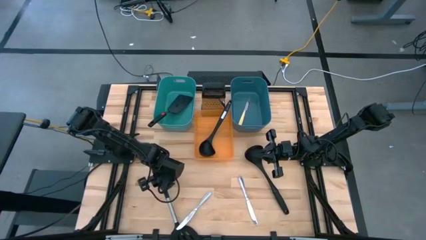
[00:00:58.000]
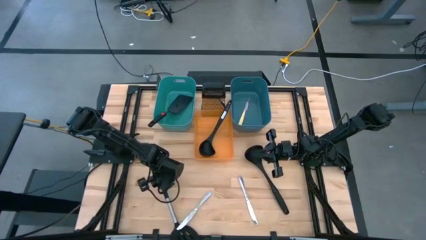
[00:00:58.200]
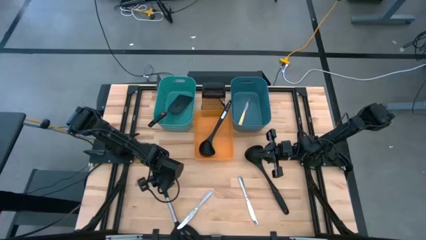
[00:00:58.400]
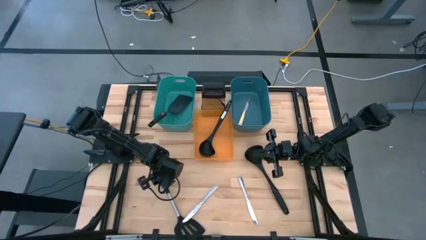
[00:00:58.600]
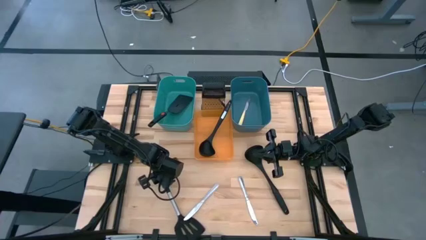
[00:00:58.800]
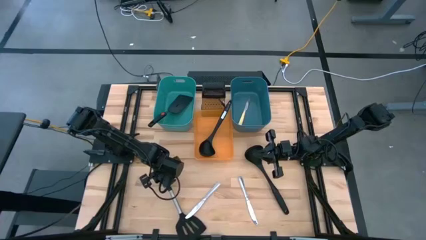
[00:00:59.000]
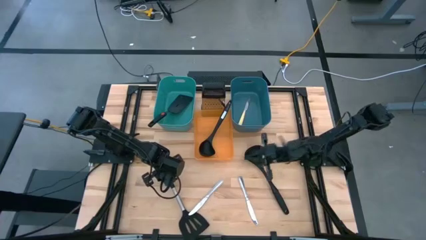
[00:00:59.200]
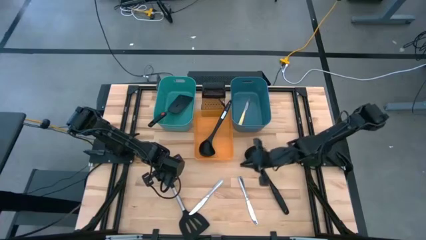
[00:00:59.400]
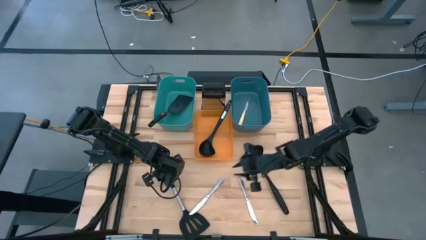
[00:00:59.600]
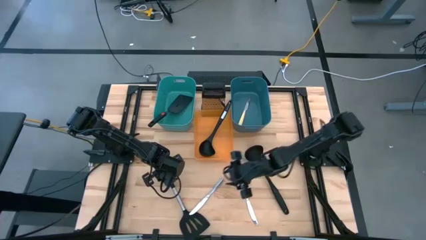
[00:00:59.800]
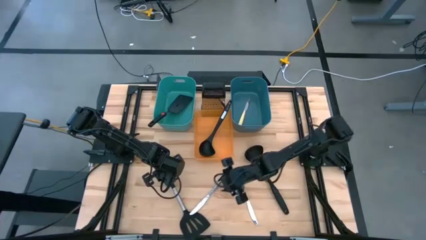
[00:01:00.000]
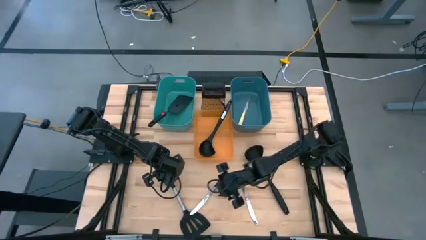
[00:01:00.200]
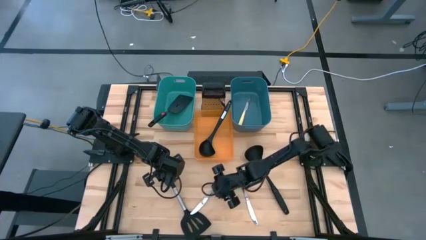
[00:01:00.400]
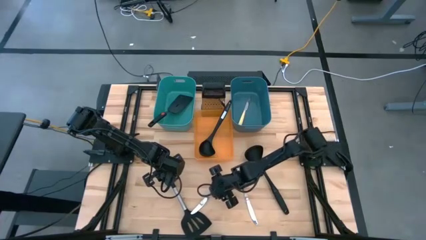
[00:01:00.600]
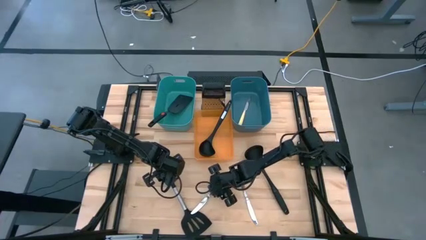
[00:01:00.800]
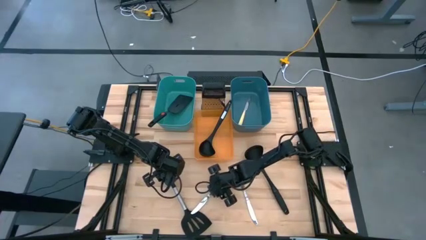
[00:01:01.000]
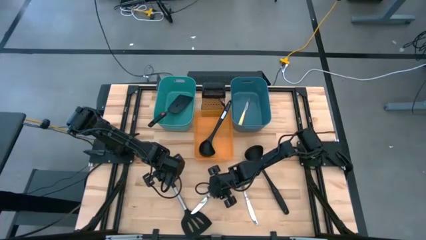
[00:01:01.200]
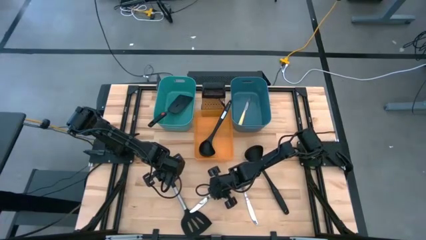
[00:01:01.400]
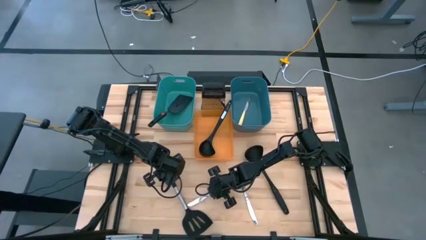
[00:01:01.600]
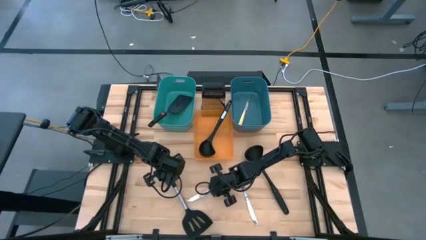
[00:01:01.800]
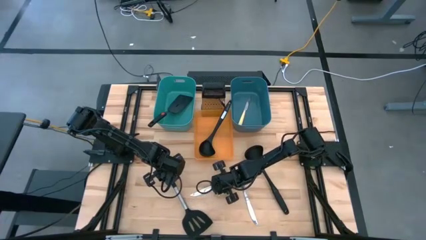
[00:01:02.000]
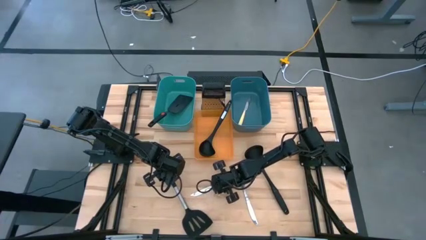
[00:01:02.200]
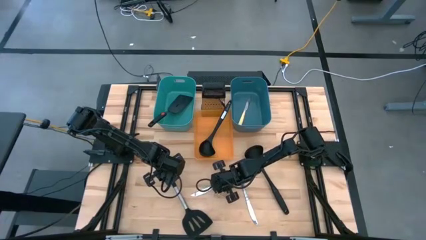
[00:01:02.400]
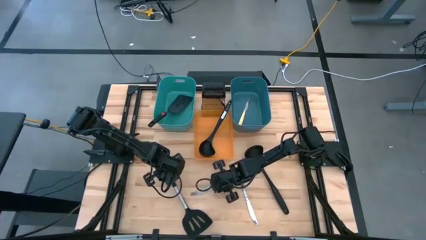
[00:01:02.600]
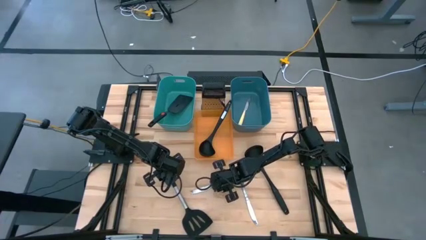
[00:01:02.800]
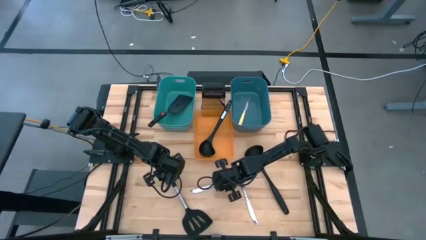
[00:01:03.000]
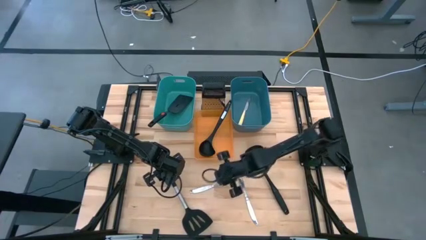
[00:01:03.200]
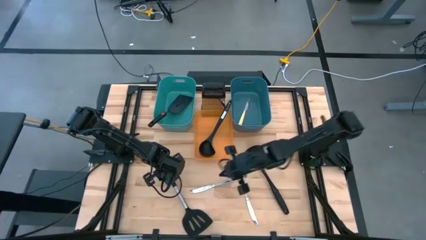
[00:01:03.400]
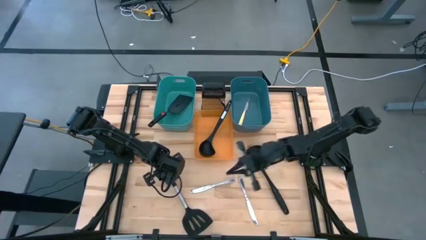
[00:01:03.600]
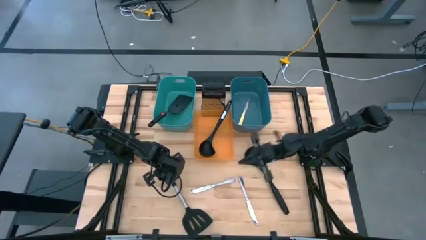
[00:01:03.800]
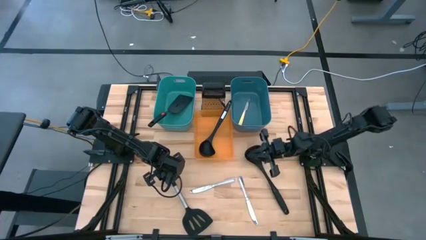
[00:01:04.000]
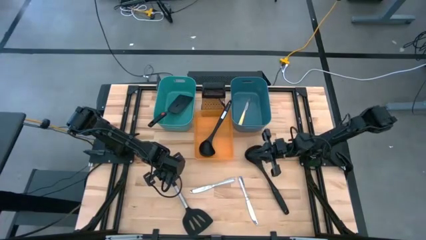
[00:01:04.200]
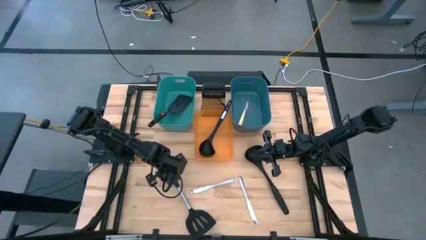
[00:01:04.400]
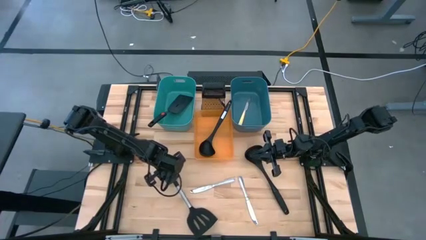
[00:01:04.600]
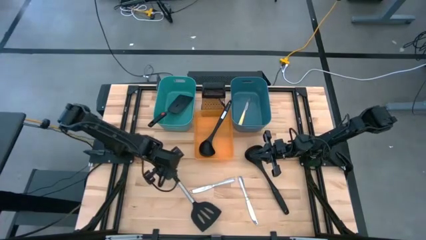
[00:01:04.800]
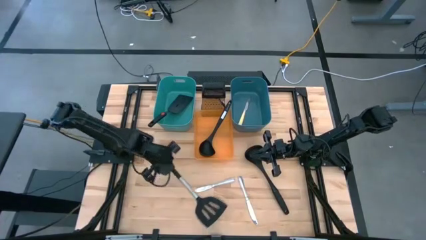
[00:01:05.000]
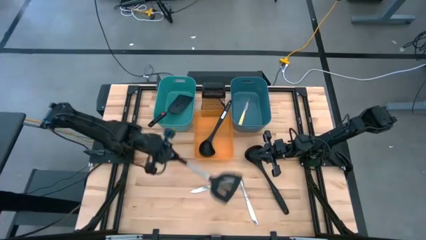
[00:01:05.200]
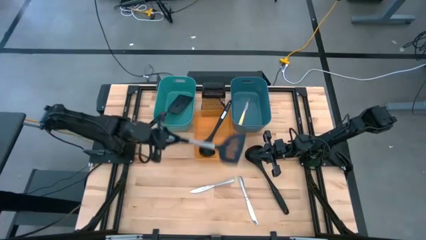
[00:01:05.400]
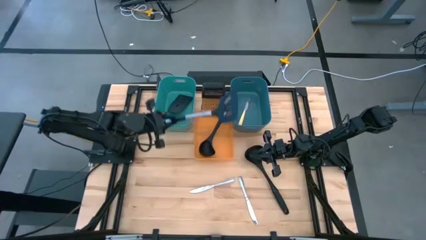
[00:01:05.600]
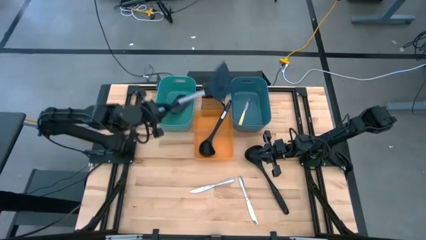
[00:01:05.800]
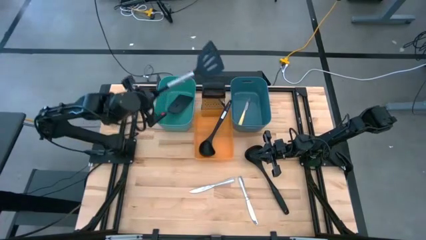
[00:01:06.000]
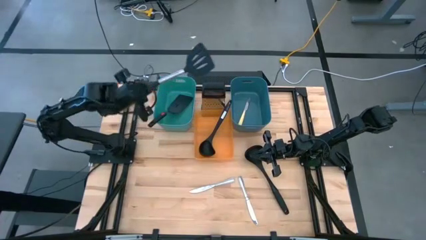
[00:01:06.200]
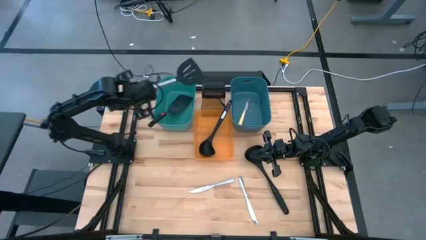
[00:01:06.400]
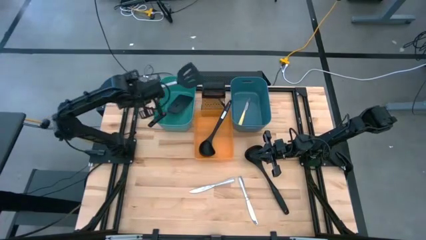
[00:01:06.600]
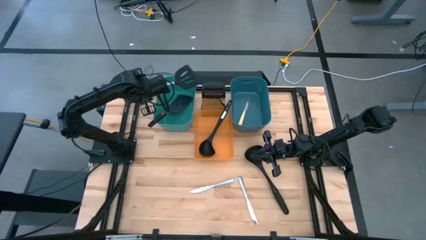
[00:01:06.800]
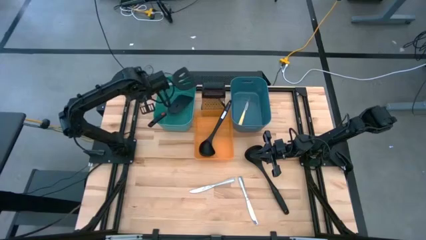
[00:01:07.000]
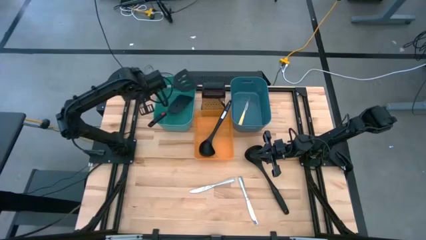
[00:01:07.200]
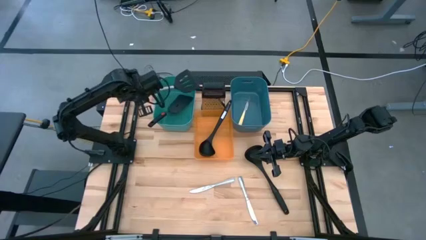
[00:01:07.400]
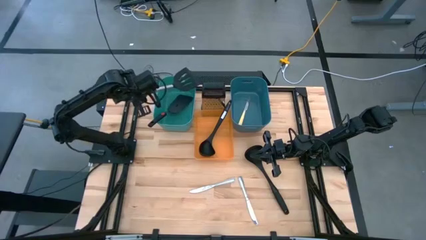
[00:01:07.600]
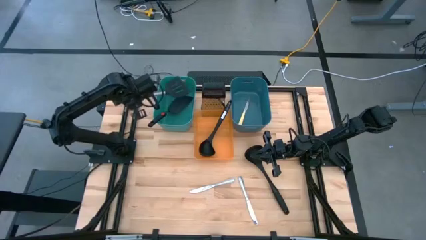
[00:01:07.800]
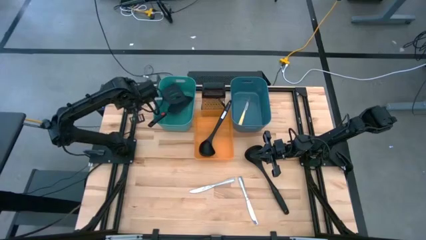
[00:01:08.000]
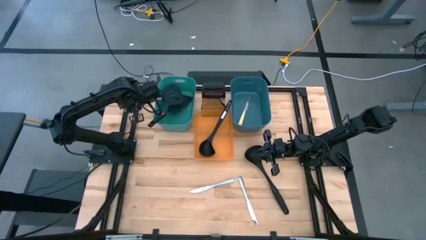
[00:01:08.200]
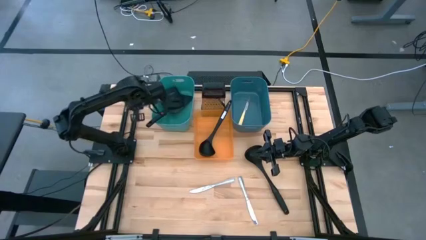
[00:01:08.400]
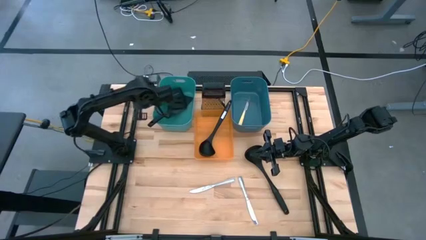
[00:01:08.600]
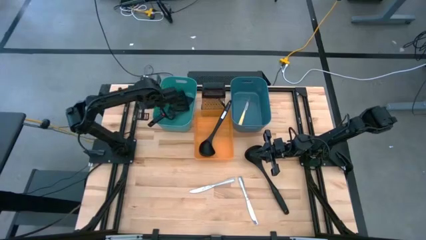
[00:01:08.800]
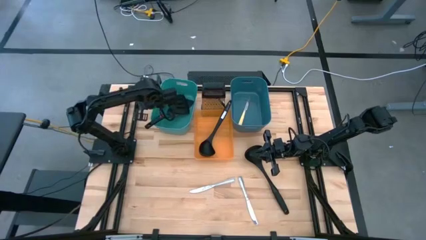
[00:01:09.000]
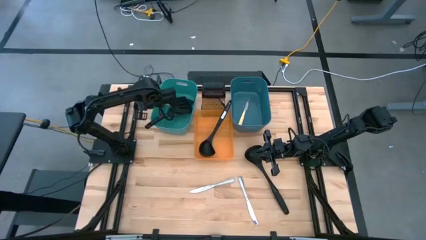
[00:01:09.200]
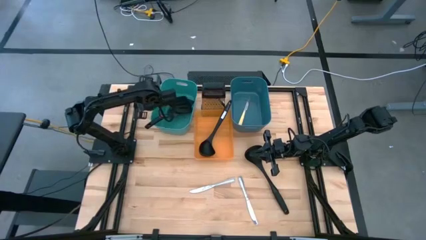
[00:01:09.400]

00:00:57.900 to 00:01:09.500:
Task: Pick & Place Kitchen Items
Put the black spatula into the green bin

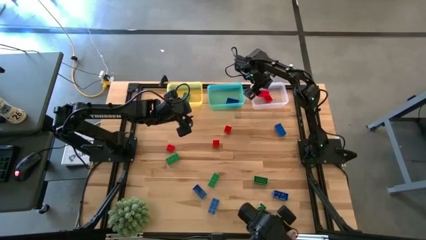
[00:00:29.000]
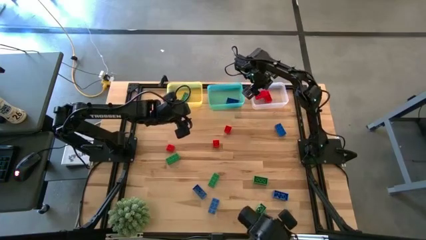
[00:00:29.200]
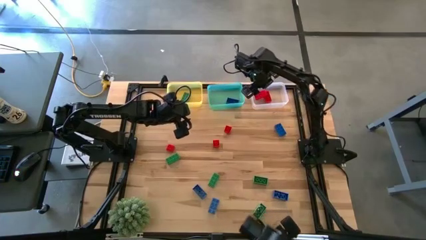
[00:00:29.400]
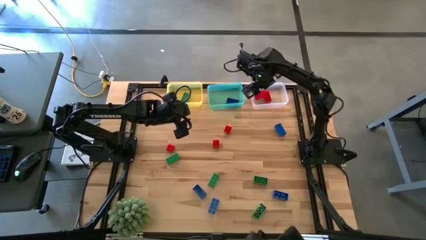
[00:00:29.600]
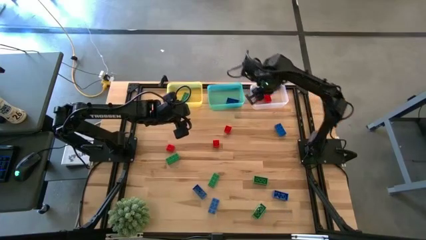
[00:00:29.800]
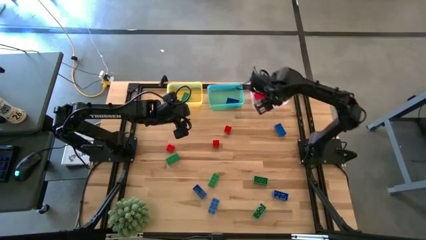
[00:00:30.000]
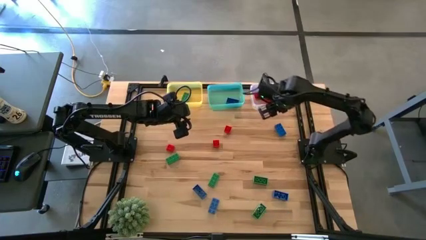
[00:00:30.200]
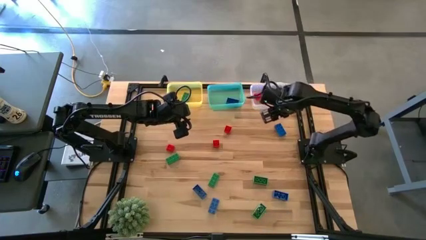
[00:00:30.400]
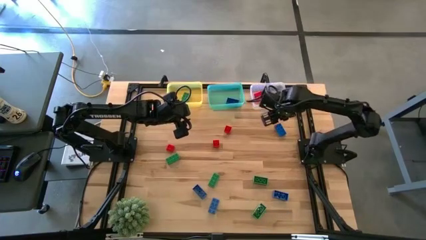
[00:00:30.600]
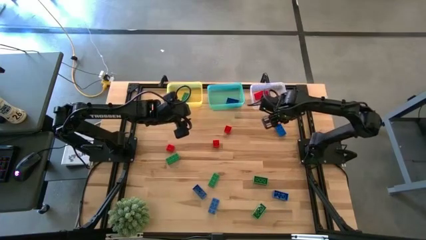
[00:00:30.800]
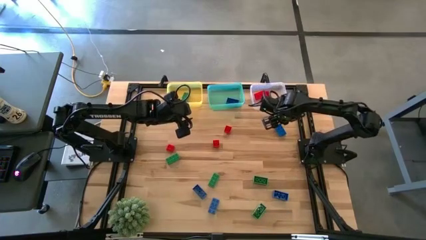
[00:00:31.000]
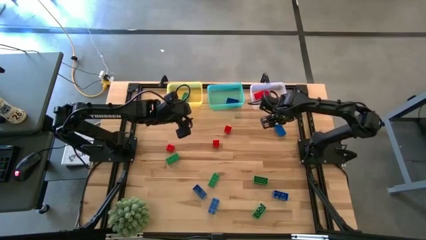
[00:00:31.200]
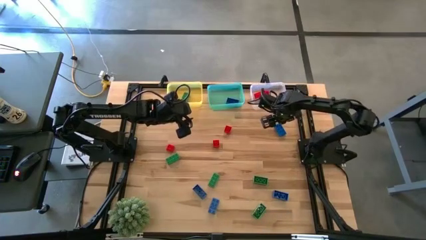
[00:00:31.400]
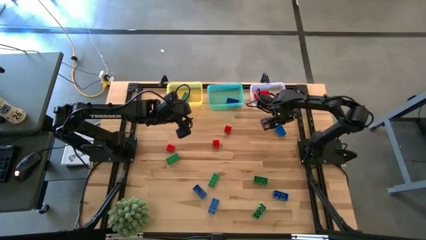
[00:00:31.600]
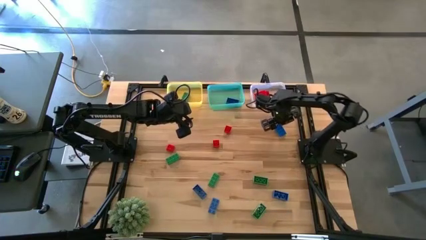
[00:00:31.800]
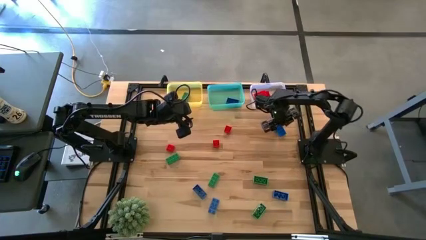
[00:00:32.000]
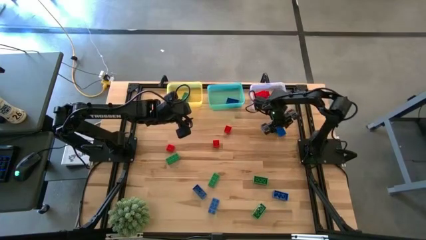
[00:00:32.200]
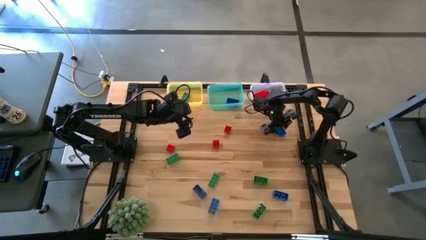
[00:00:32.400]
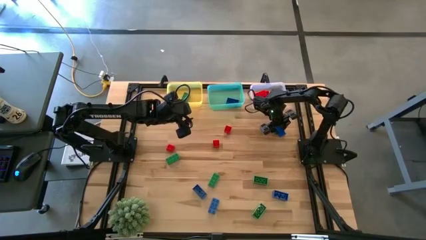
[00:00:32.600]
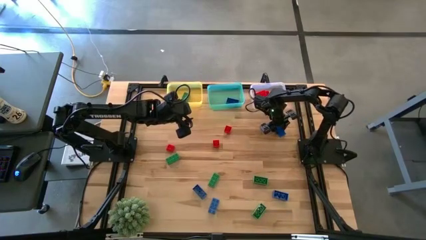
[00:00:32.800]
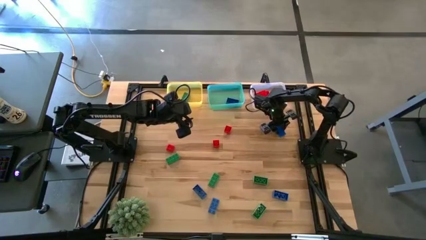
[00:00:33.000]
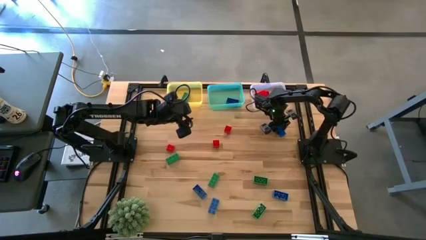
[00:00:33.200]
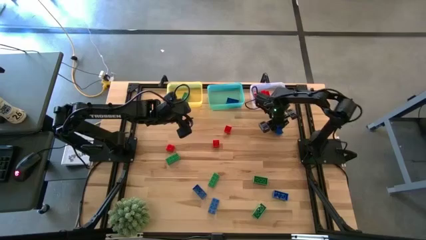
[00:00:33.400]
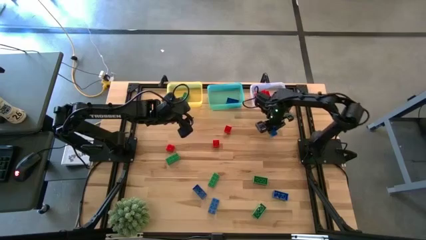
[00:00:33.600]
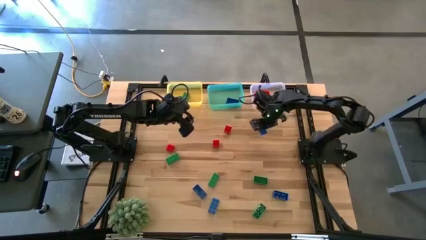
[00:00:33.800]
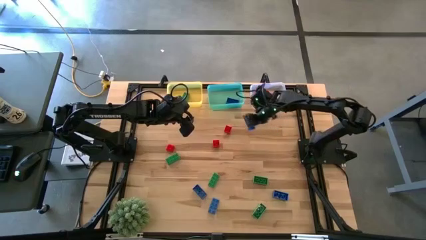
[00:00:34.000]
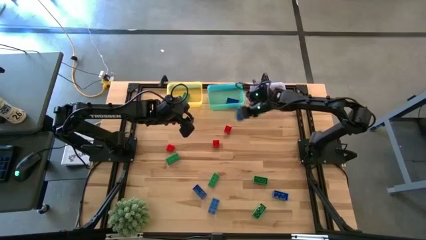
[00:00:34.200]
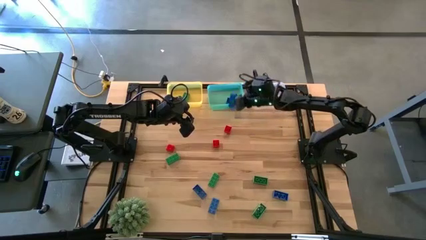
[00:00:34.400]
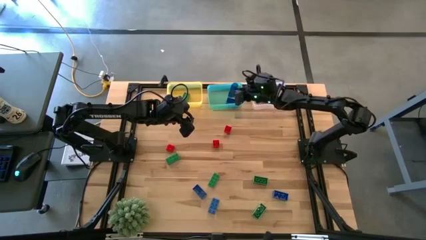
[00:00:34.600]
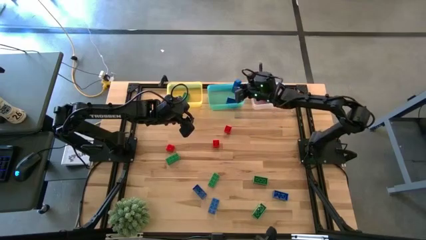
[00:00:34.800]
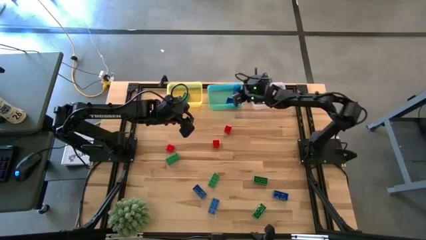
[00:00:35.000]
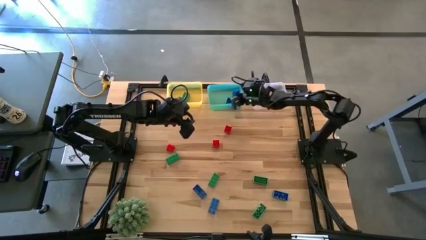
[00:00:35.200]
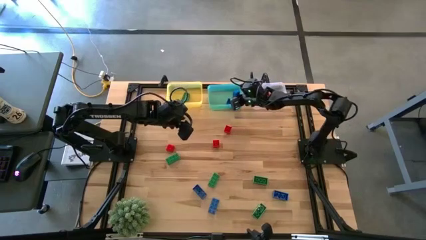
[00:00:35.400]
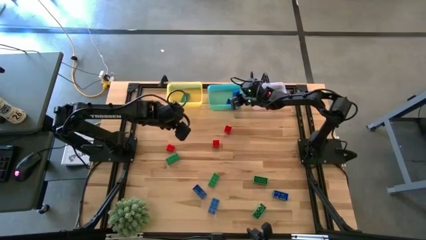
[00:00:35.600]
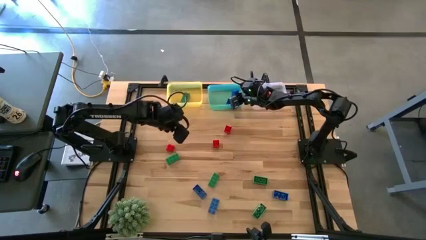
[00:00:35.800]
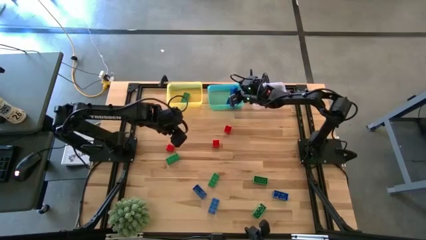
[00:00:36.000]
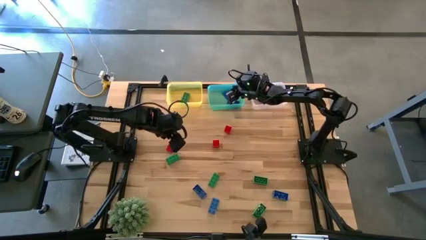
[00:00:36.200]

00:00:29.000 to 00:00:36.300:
Task: Sort & place blocks by color
Put the blue game piece into the blue bin
